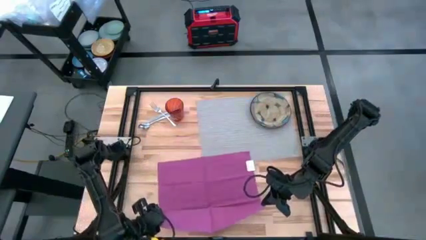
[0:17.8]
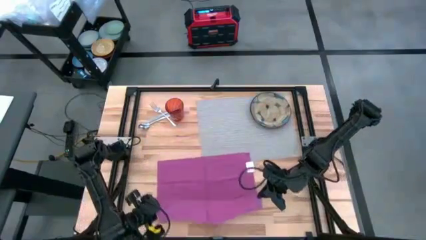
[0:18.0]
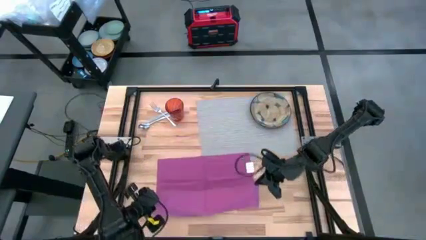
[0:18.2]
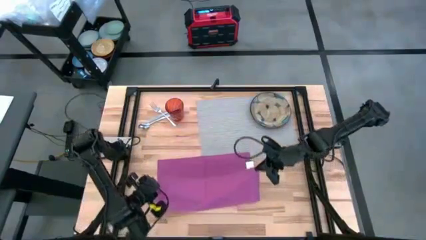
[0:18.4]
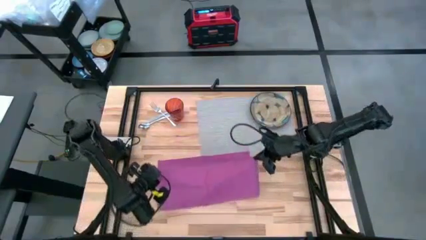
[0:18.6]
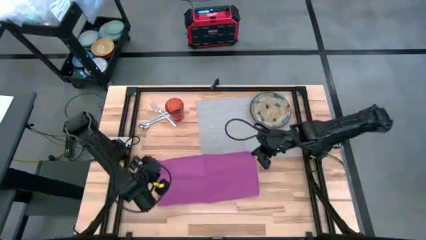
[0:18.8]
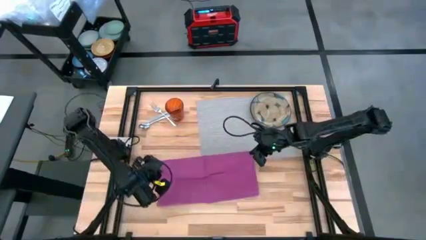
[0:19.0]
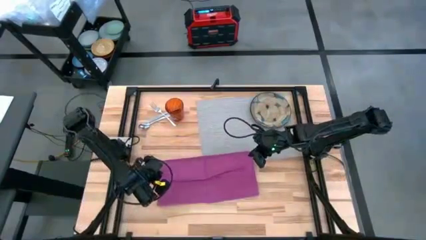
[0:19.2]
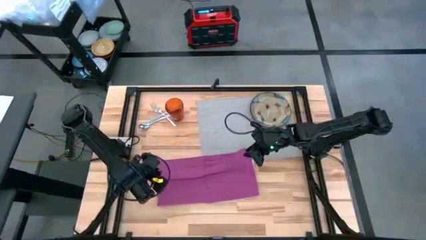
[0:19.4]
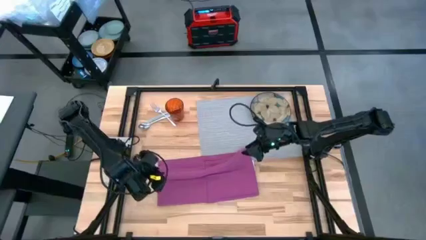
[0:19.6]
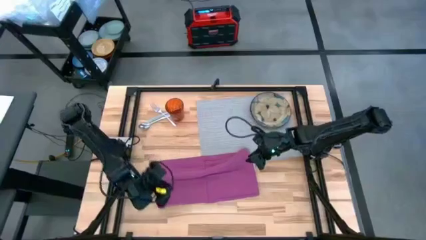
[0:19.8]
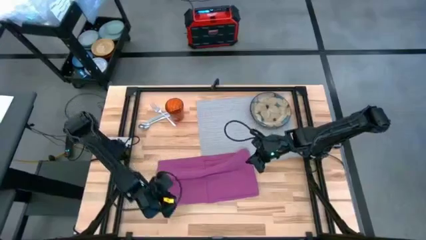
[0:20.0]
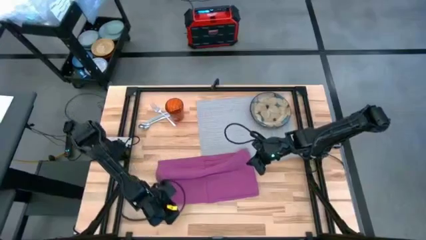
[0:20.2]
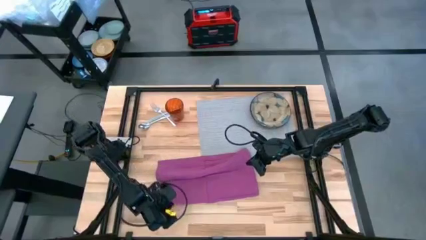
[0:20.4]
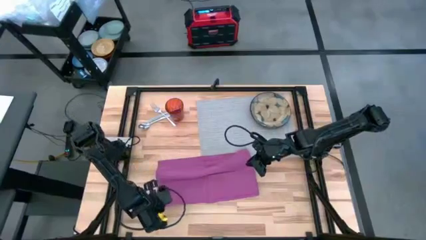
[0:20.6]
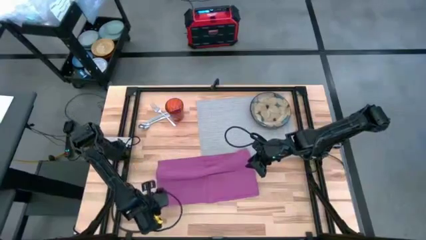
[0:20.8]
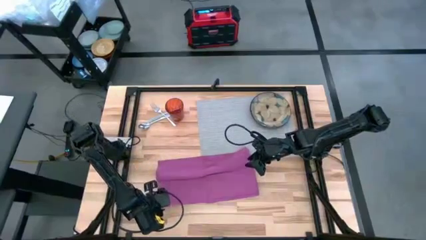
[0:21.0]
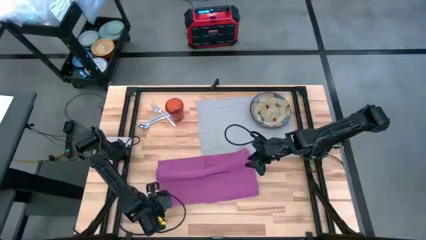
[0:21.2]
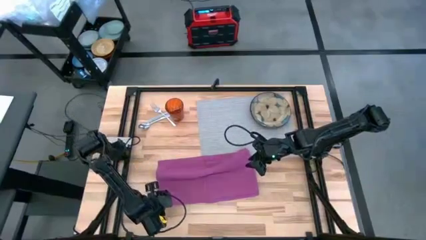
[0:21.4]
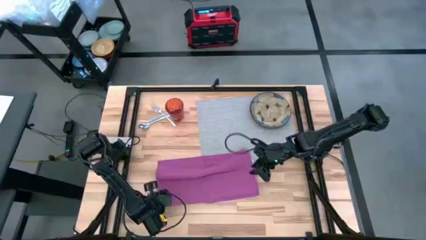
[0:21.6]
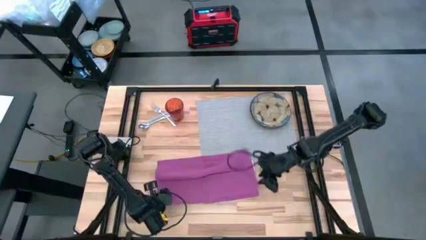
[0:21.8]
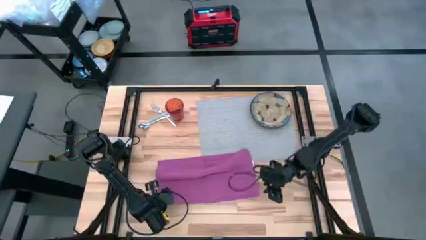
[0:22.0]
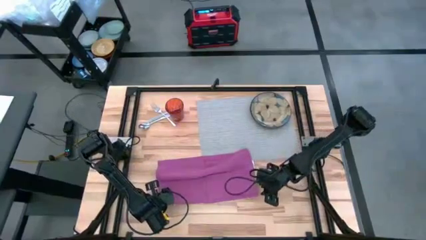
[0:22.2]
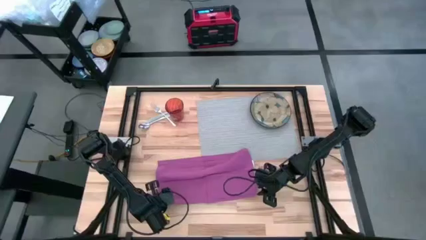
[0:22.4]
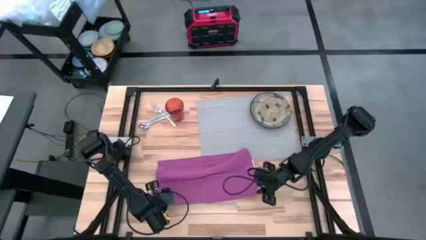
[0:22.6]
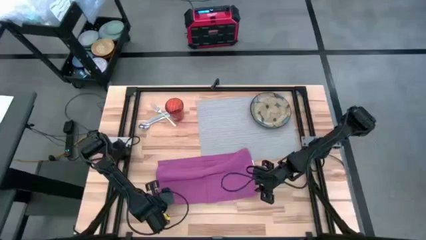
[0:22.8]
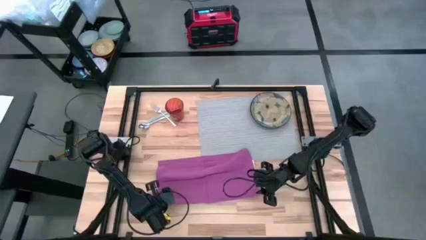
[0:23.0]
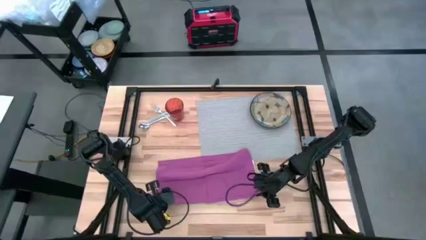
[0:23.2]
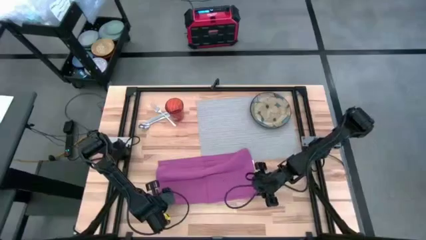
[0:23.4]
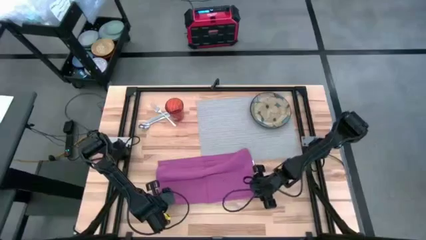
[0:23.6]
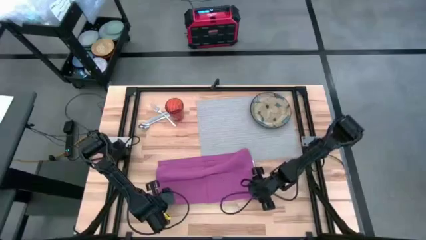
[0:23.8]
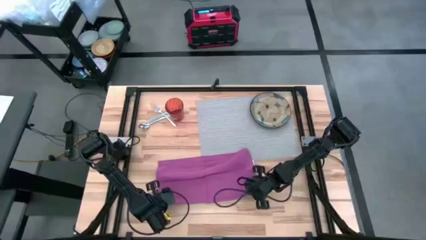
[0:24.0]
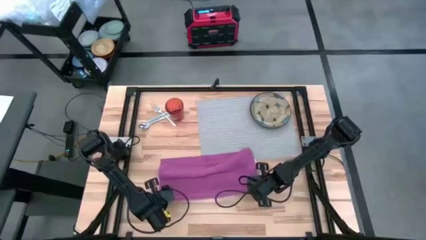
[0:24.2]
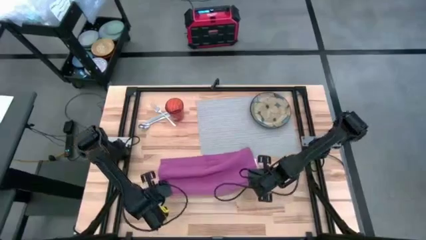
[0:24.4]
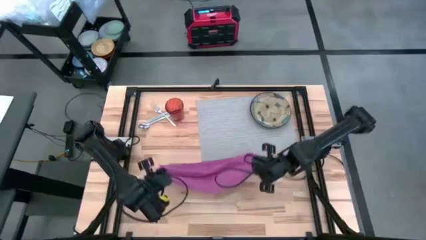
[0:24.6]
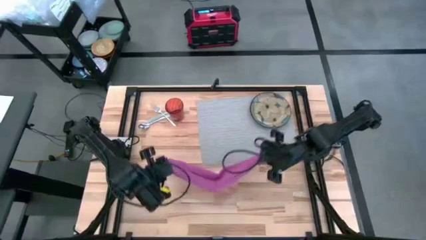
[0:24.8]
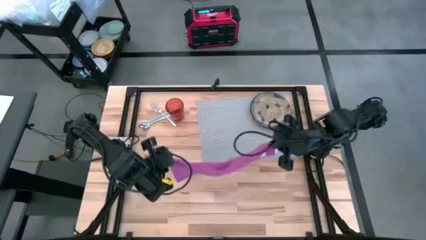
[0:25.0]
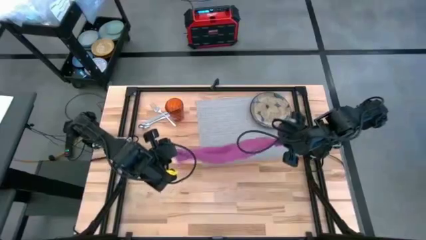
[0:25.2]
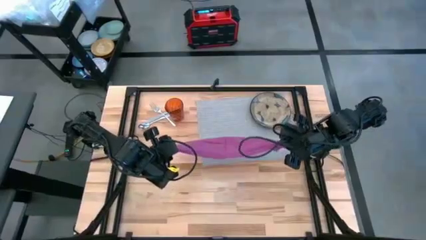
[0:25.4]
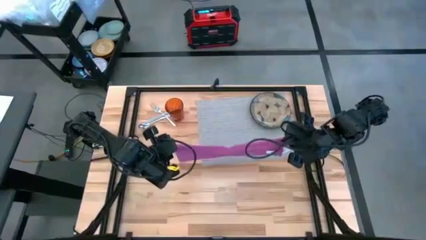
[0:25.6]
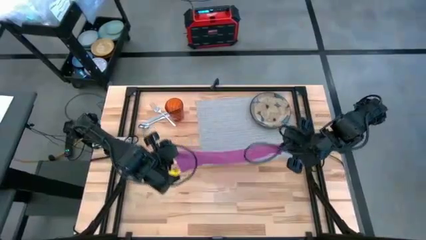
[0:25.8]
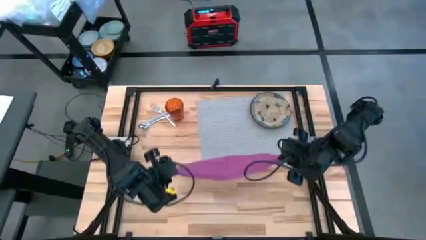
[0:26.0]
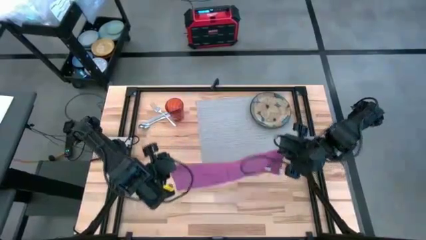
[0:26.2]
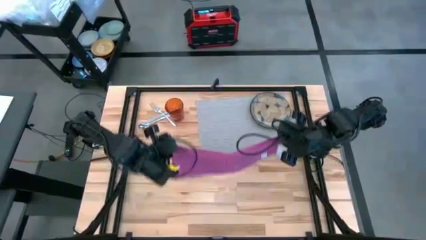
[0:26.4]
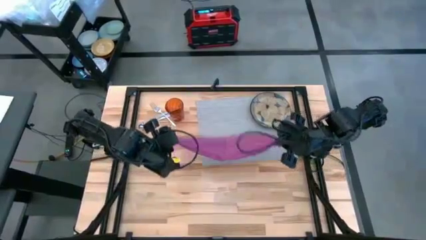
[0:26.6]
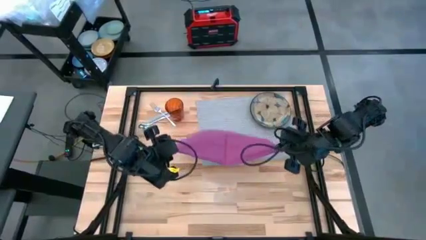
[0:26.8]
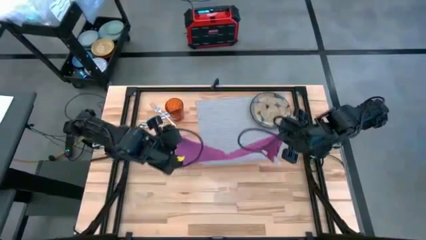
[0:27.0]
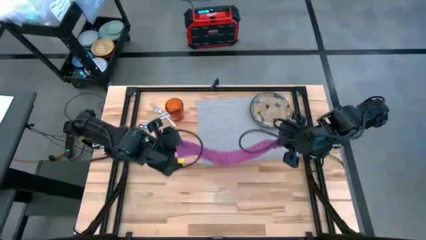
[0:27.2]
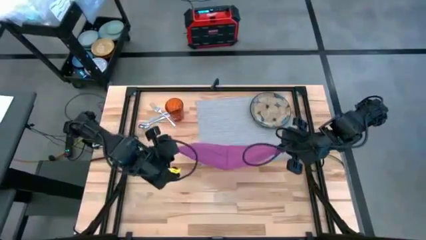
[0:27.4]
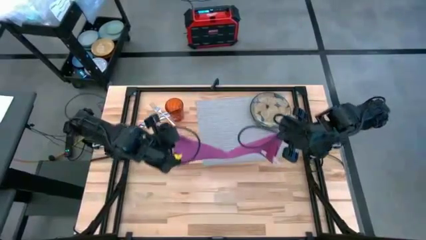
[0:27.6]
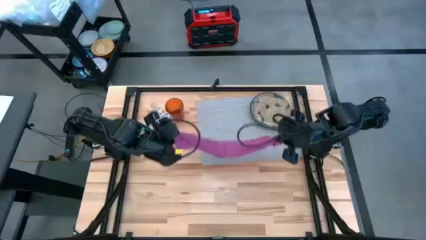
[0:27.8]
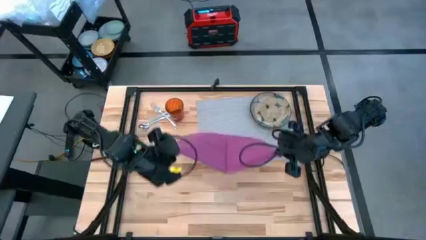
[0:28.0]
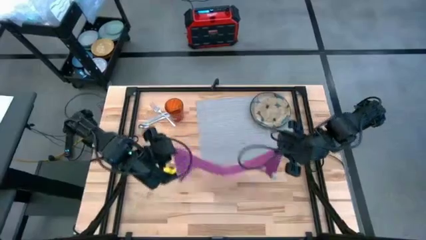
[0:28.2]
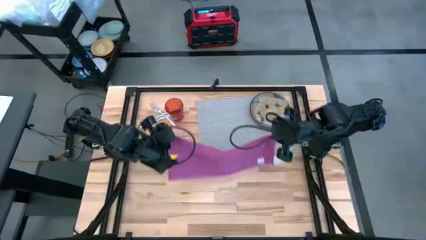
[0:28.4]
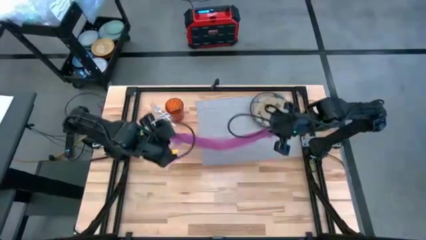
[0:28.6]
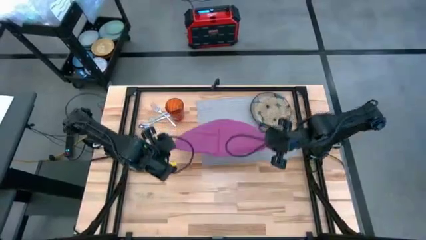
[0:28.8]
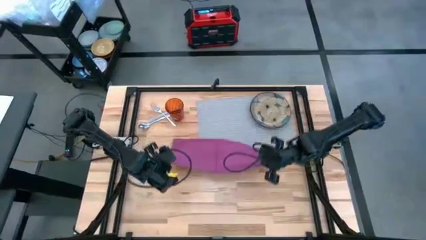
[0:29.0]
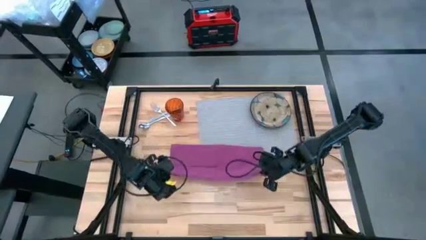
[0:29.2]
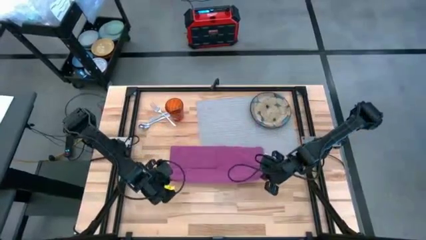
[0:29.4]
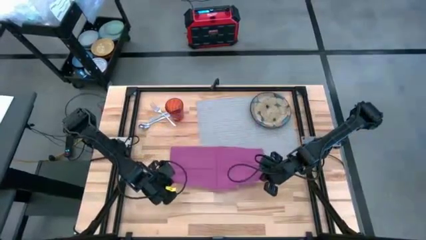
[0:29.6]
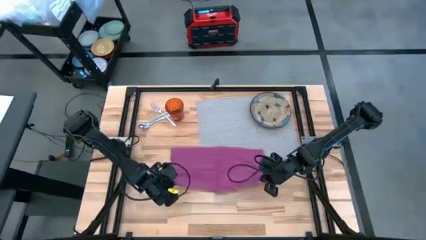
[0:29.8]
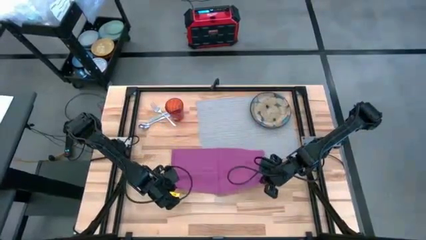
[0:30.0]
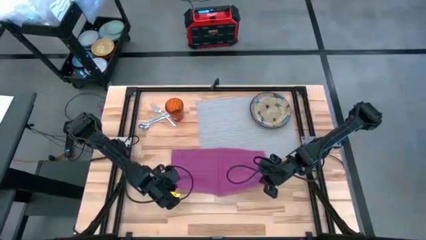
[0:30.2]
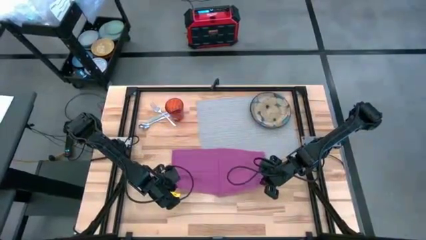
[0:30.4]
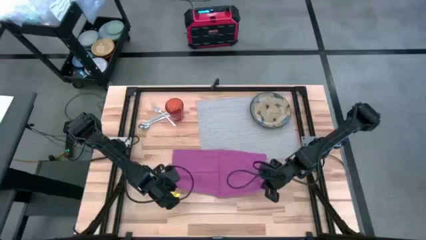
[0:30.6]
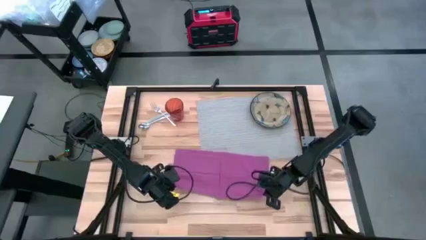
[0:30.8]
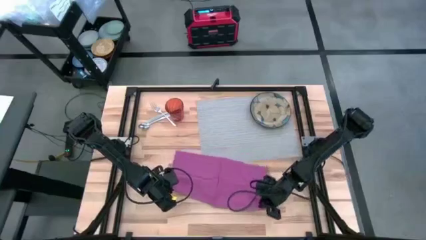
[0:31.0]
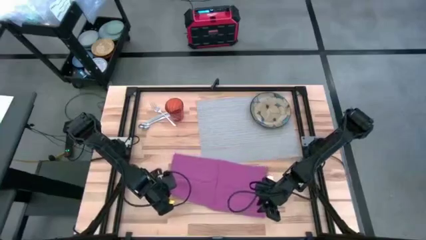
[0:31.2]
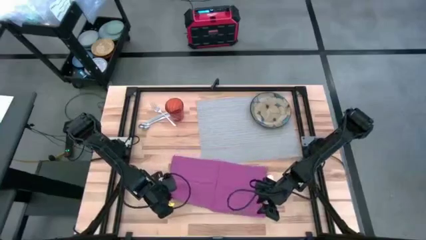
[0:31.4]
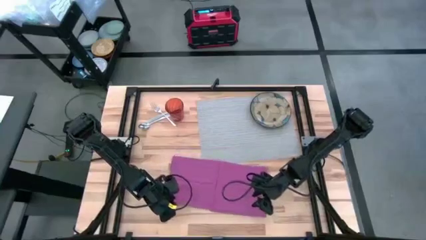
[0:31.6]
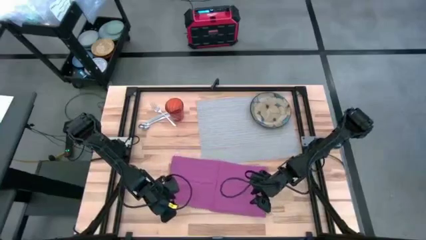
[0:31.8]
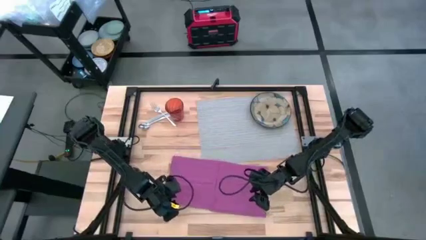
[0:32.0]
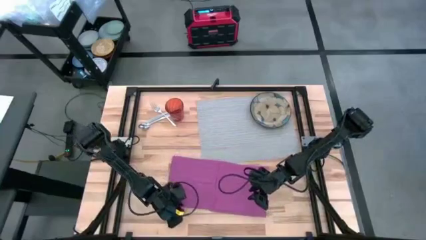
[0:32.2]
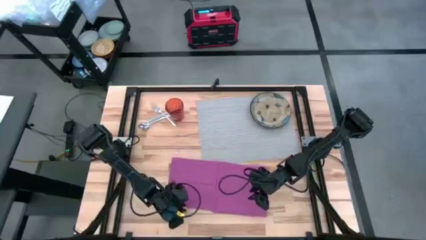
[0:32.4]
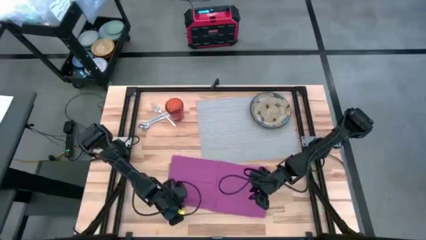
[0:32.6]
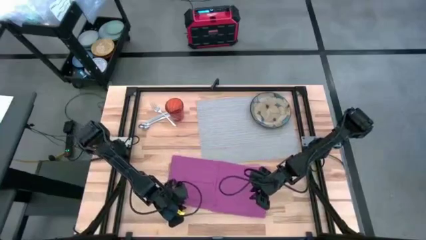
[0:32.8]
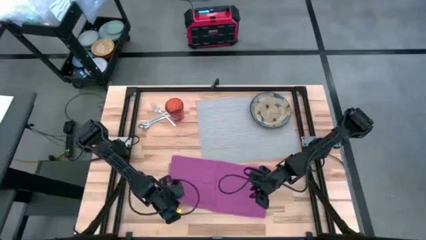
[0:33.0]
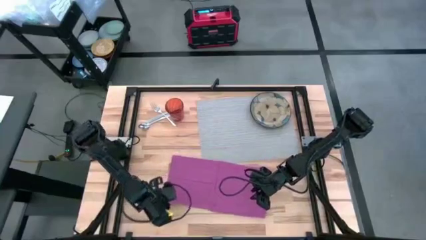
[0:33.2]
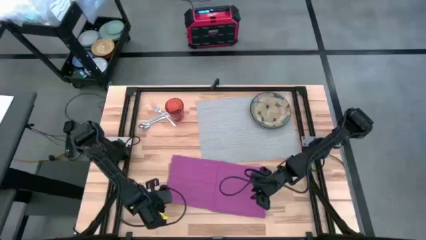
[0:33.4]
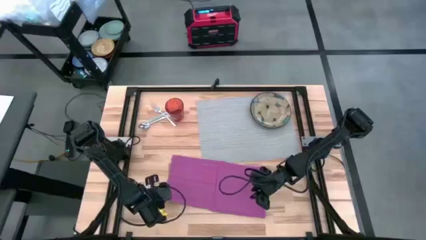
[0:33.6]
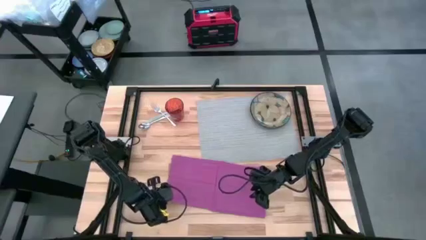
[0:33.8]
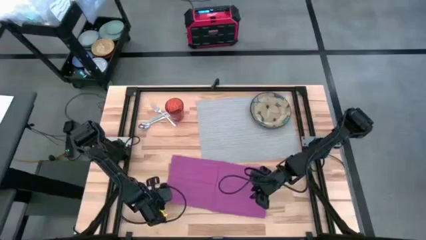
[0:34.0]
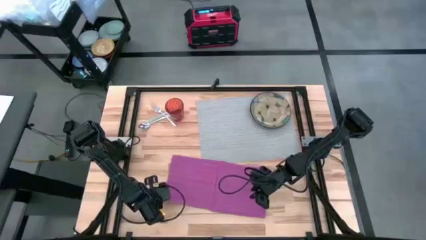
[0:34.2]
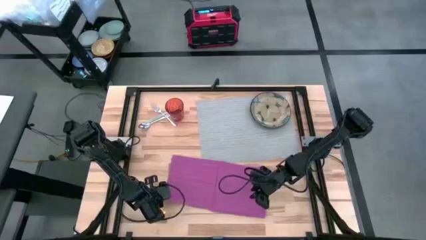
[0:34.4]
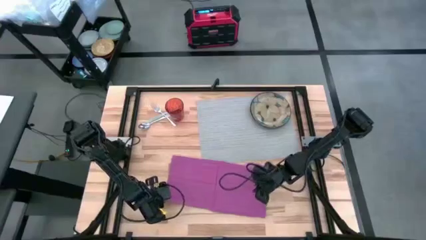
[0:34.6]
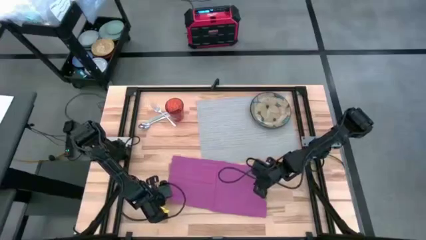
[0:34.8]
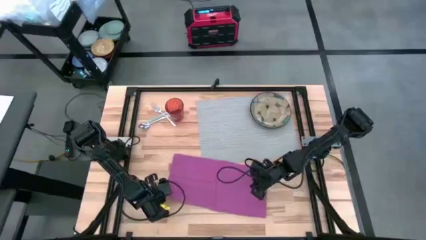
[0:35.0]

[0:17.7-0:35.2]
Task: Set table place
Fold the purple napkin
